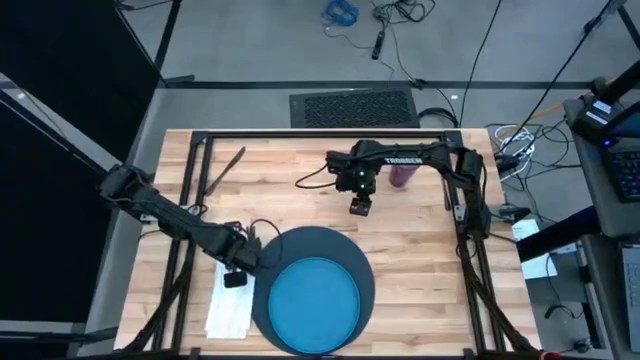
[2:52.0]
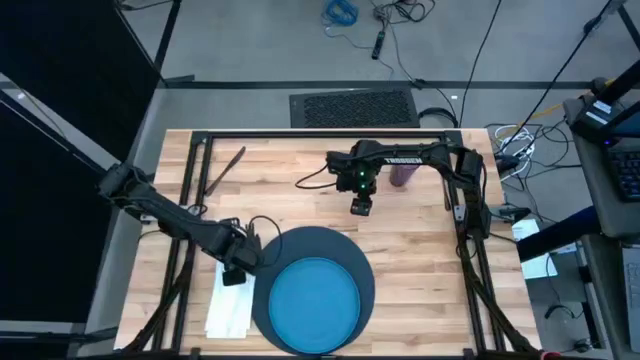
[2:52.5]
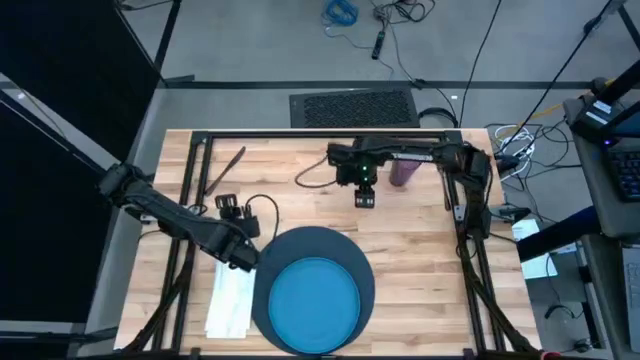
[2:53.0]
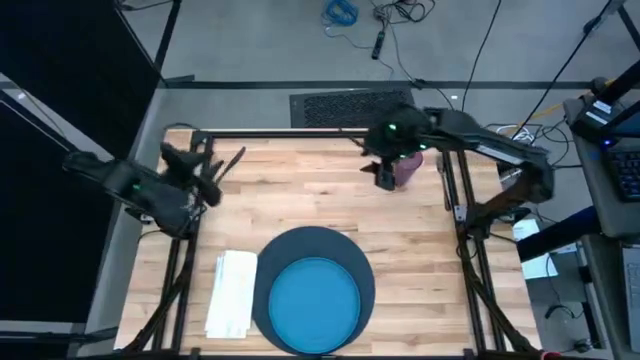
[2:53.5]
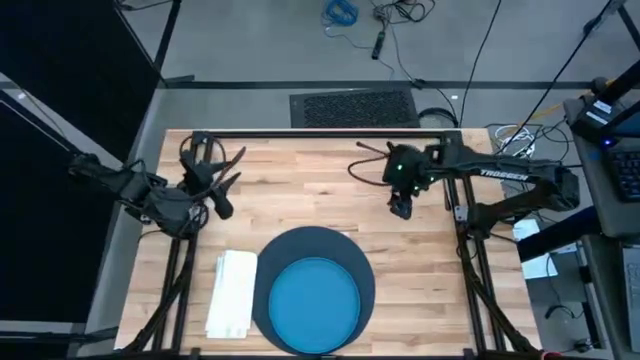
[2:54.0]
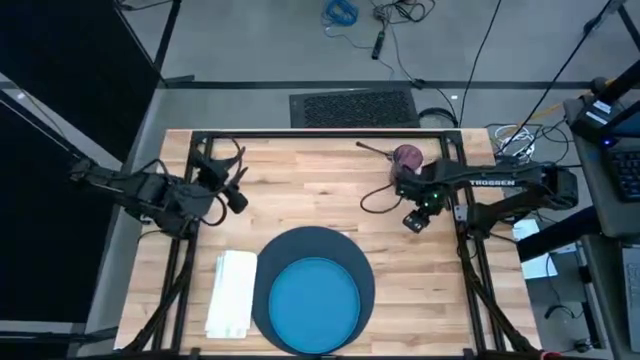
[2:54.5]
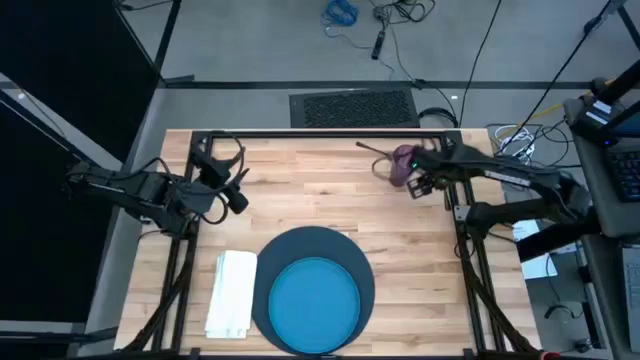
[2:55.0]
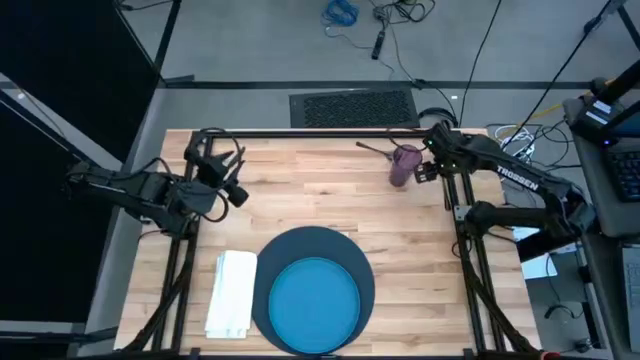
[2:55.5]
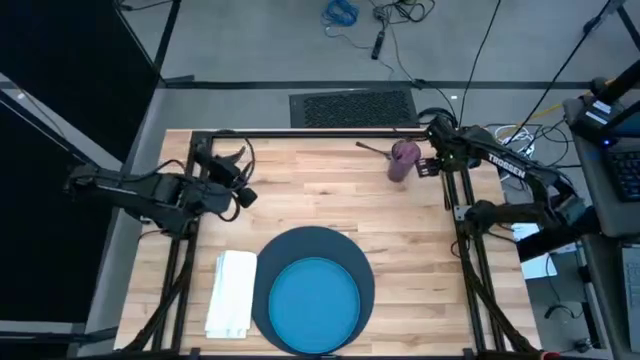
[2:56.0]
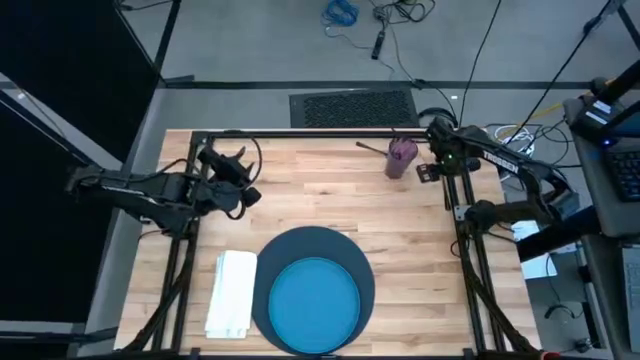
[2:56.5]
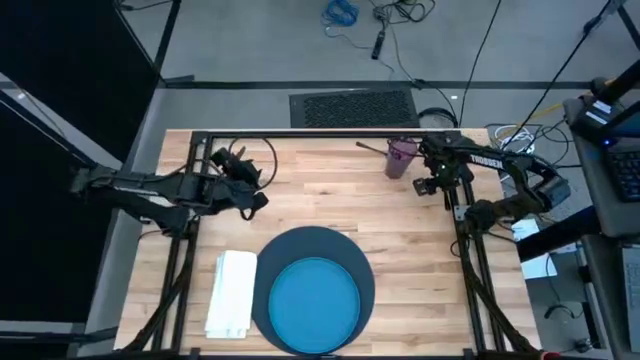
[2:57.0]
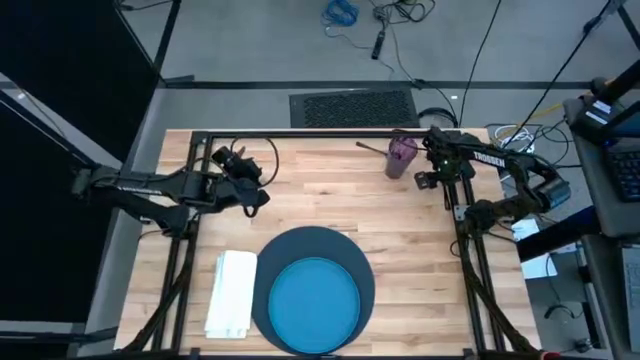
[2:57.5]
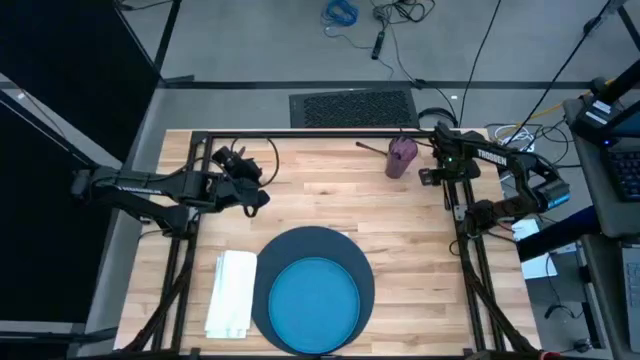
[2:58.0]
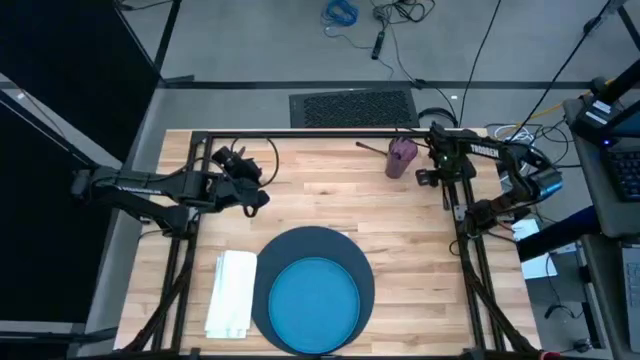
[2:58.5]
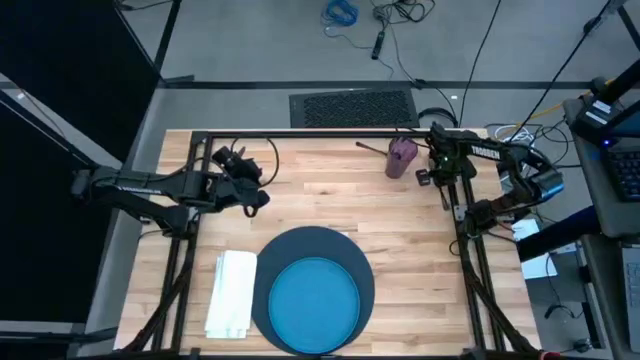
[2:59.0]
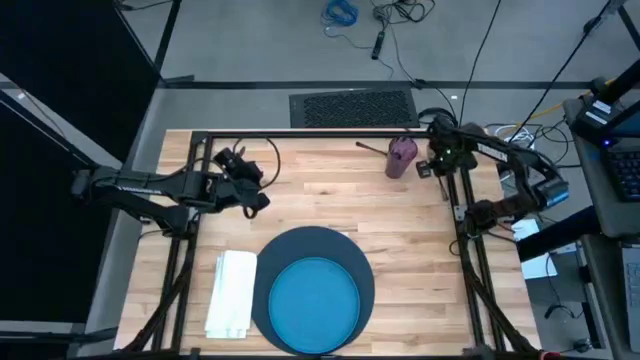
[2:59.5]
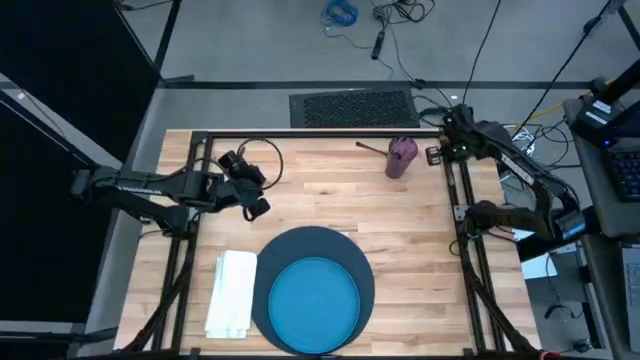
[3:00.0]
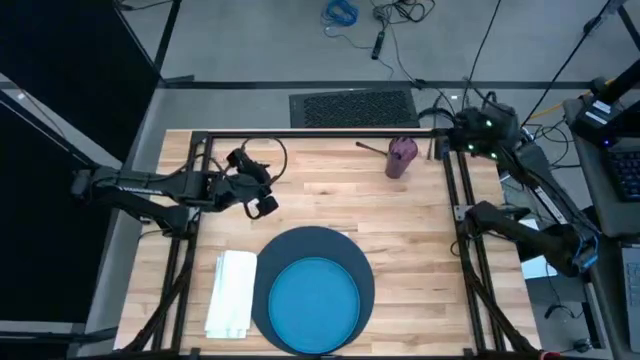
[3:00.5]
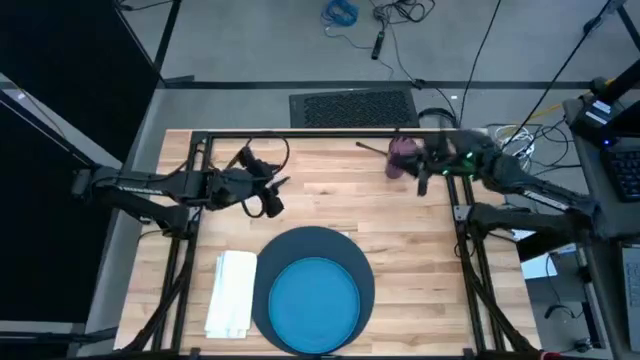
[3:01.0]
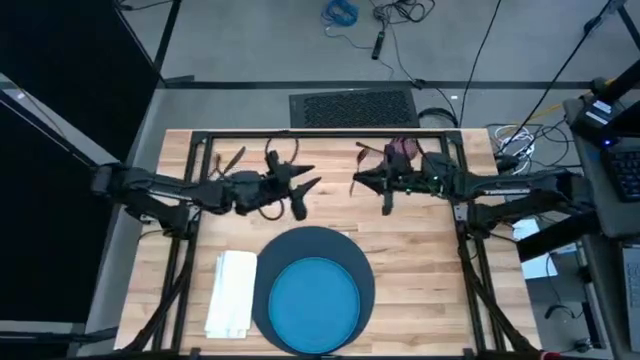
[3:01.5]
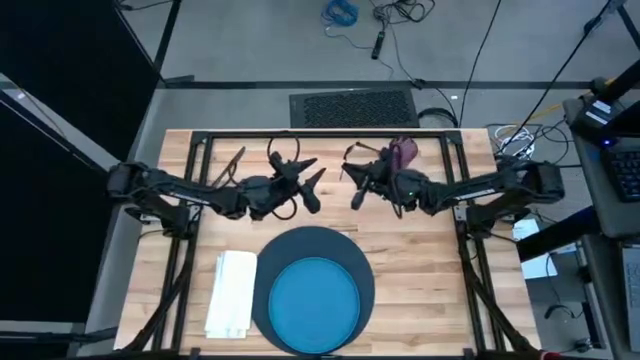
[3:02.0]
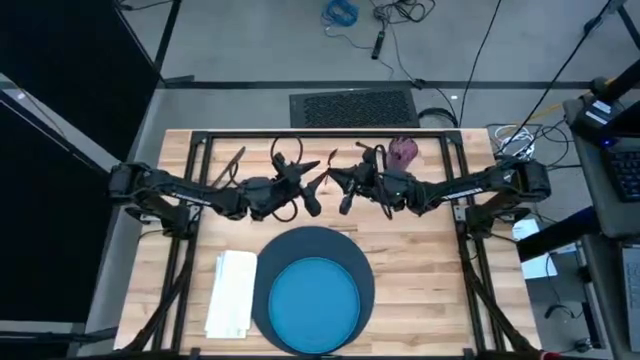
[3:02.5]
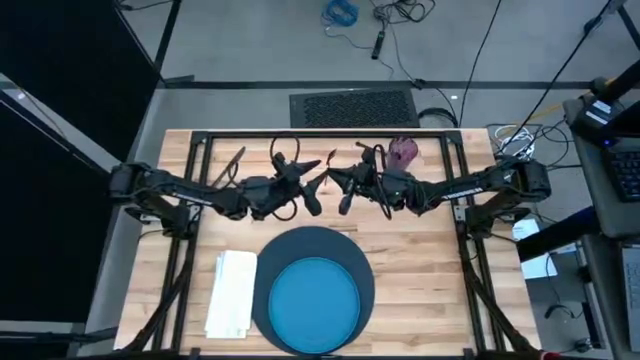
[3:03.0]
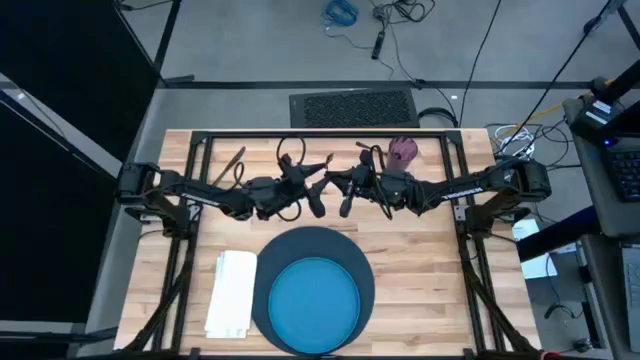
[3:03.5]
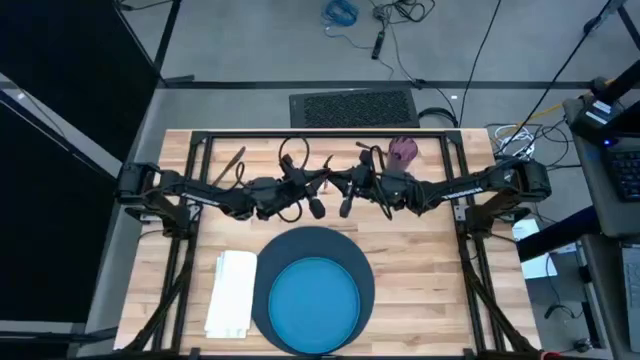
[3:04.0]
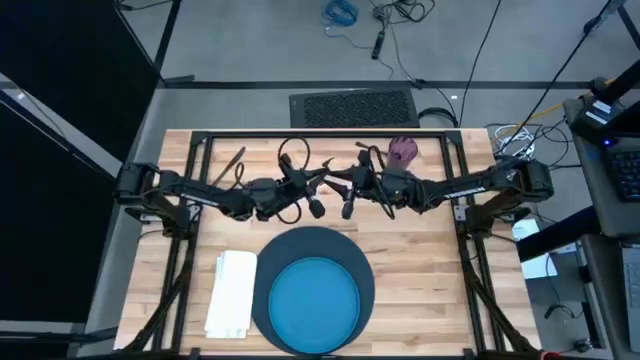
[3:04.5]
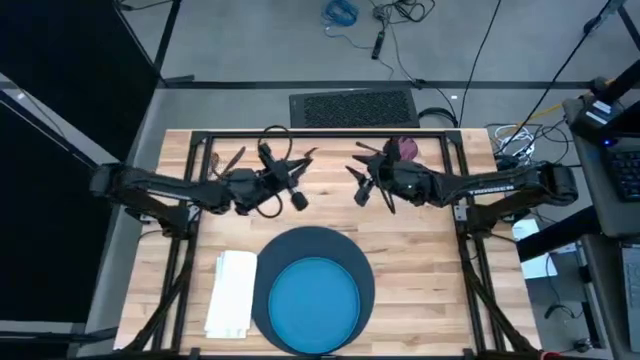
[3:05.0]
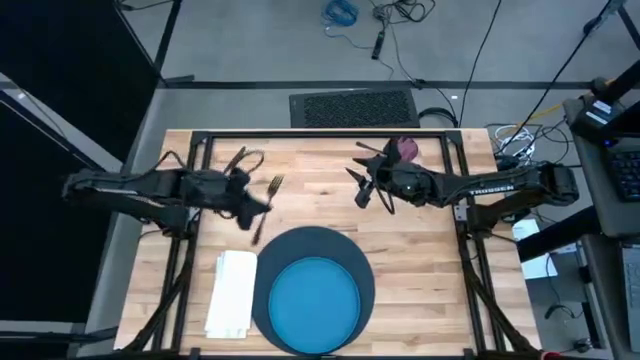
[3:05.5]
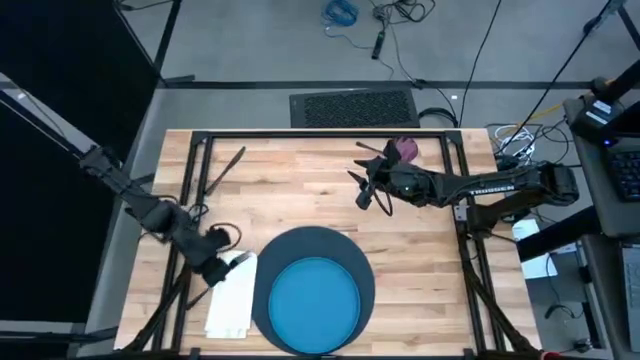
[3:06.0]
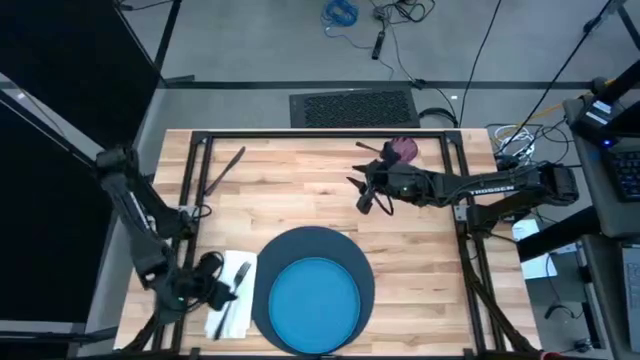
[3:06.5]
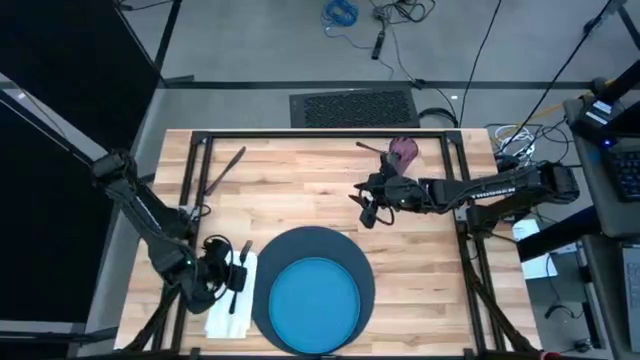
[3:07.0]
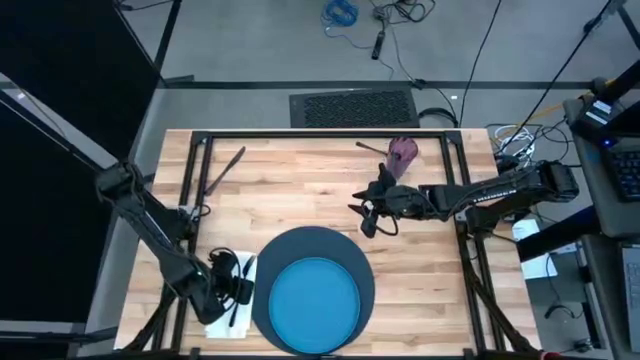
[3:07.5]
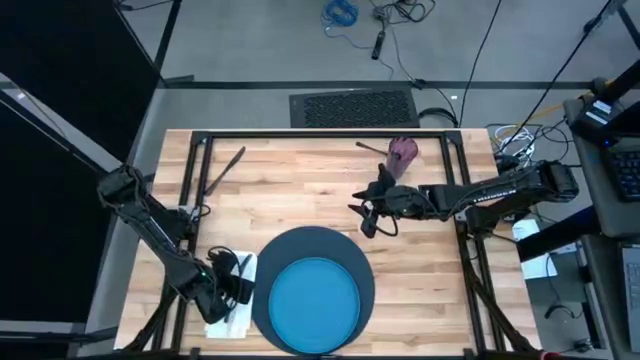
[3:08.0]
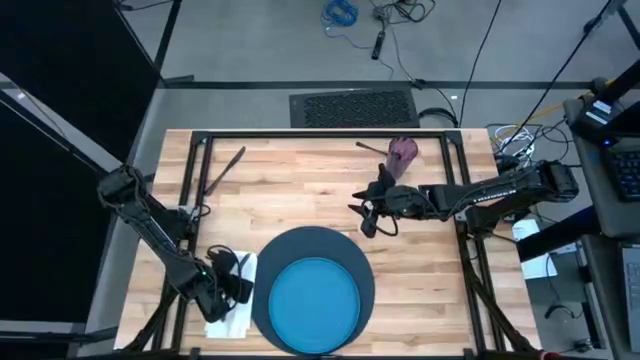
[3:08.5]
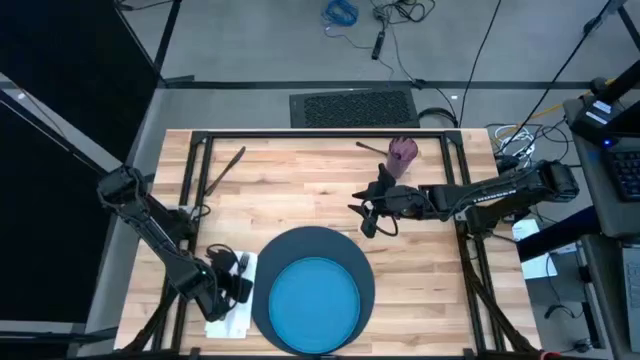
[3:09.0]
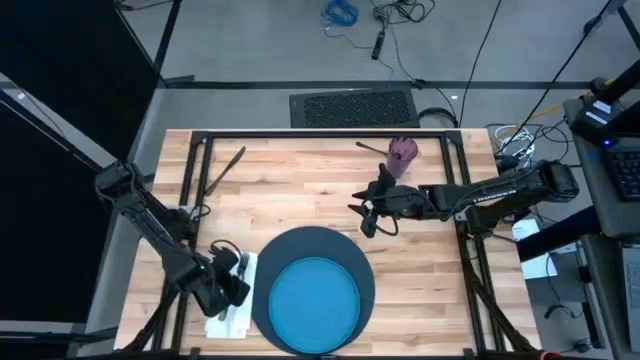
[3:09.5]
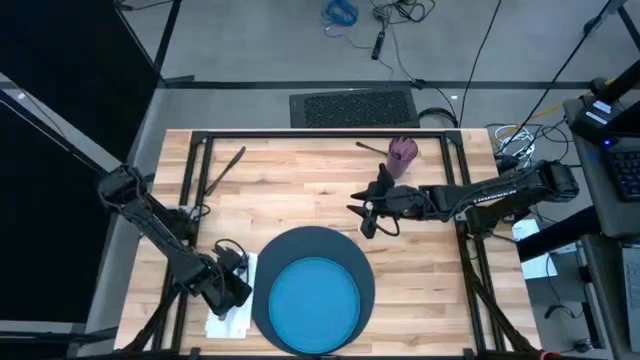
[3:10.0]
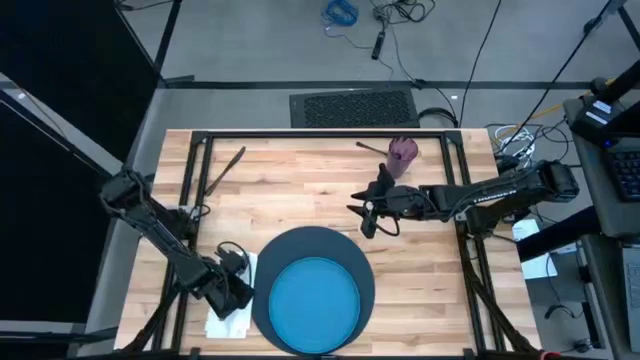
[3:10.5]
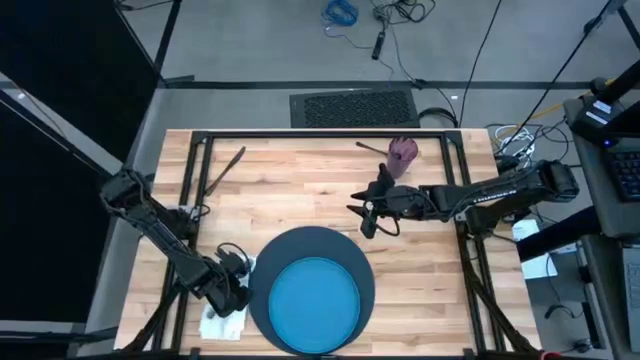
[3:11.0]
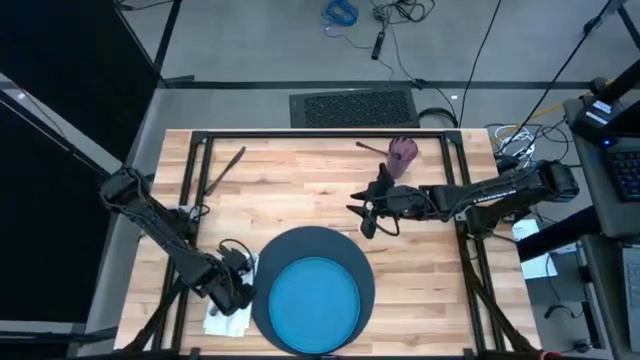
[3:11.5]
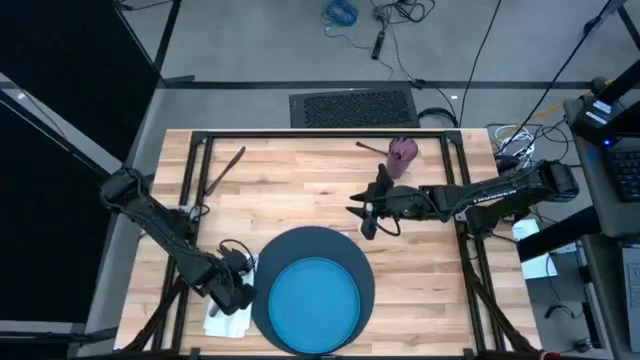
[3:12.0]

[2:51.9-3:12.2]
Task: Set table place
Put the fork on top of the white napkin

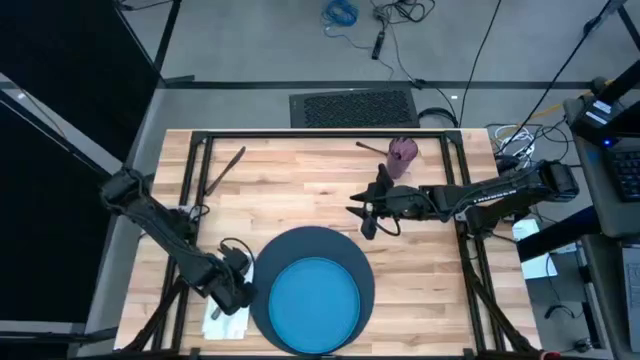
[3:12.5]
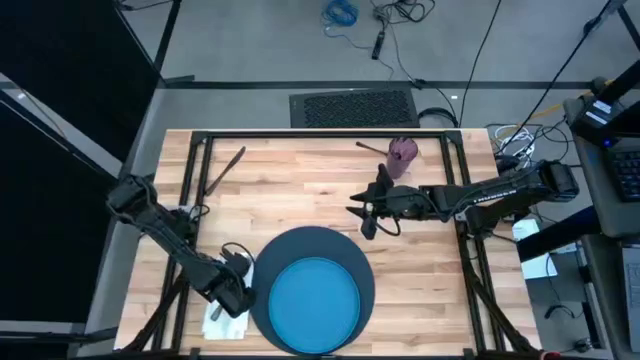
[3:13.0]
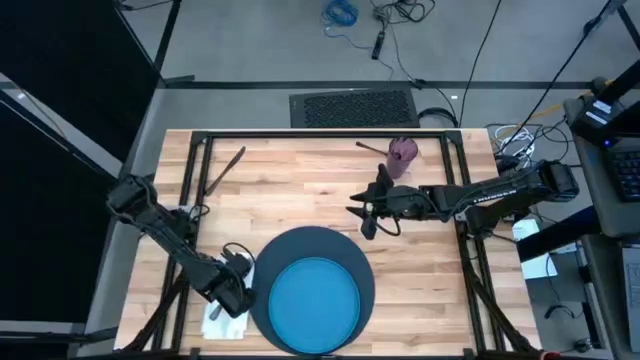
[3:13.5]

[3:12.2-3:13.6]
Put the fork on top of the white napkin

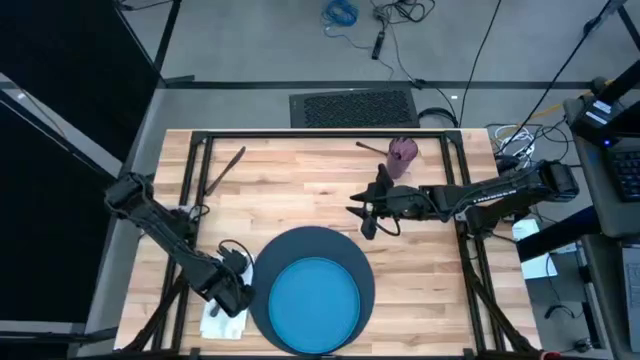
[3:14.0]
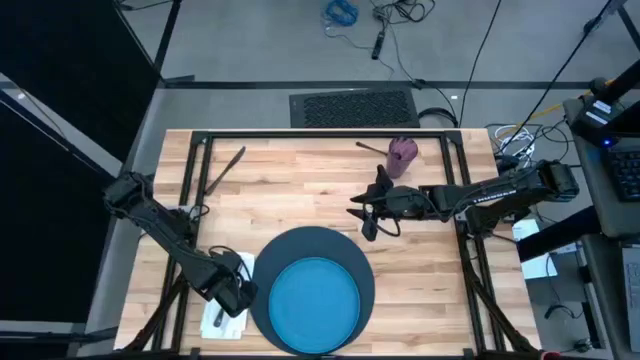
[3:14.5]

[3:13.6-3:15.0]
Put the fork on top of the white napkin
